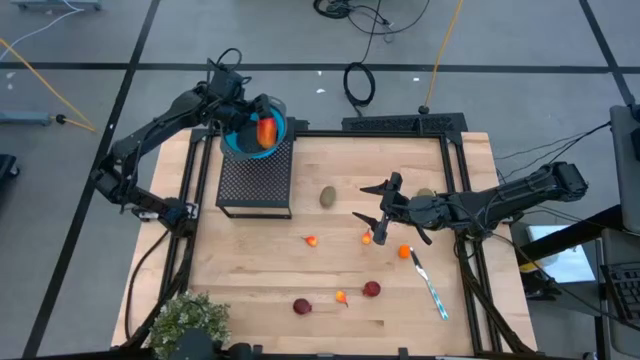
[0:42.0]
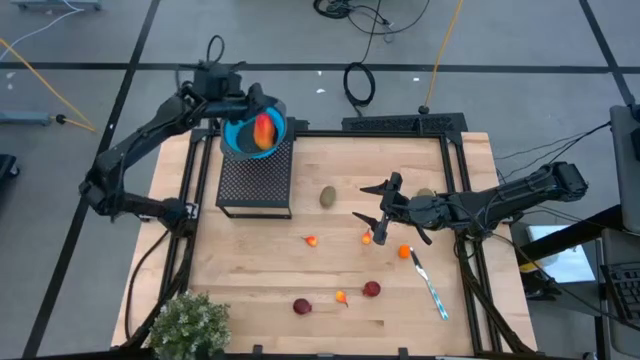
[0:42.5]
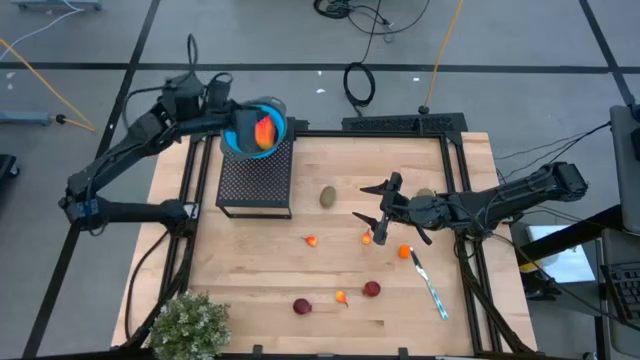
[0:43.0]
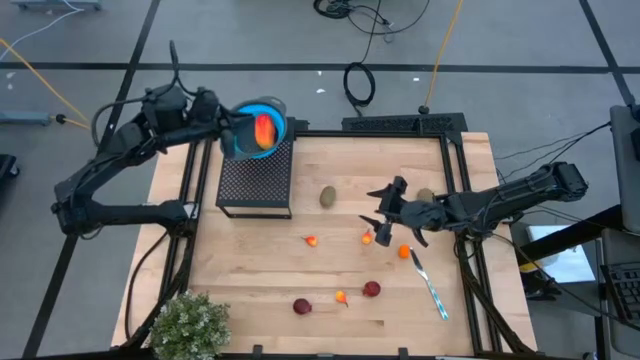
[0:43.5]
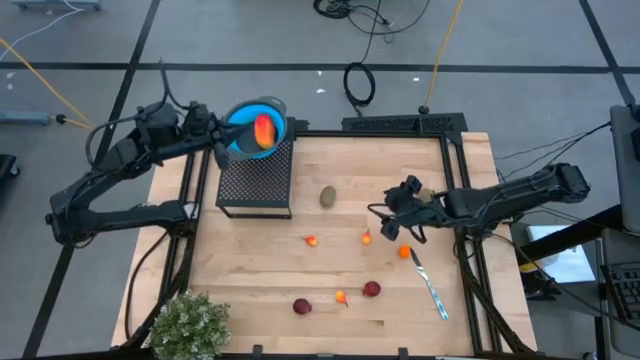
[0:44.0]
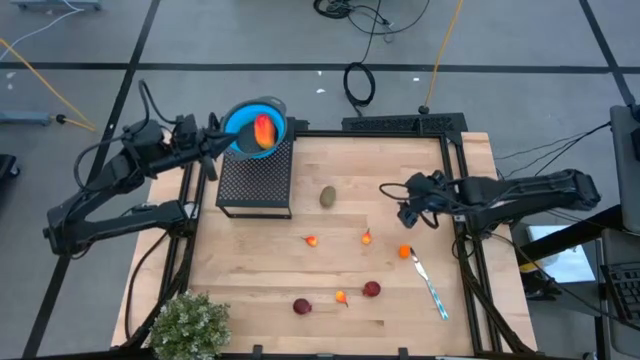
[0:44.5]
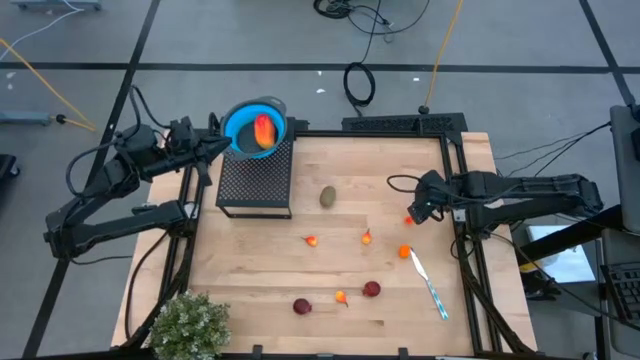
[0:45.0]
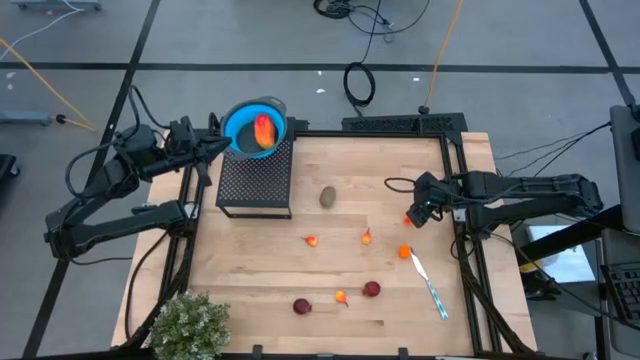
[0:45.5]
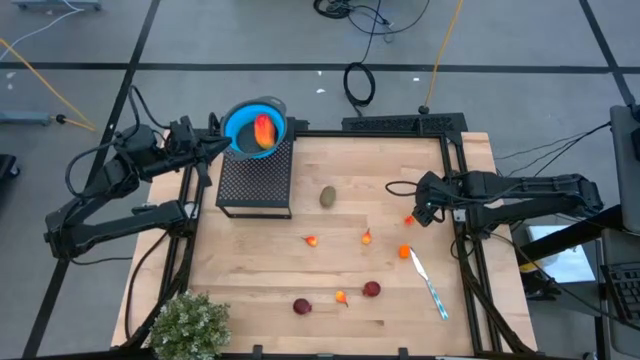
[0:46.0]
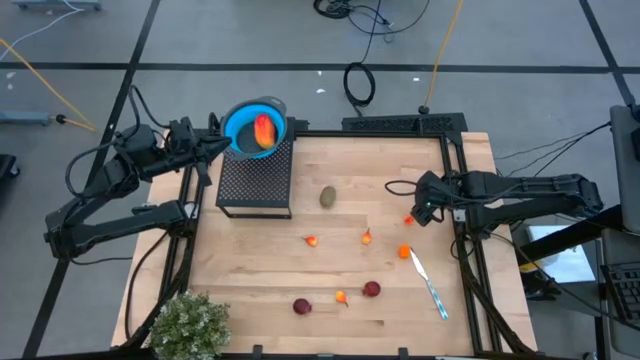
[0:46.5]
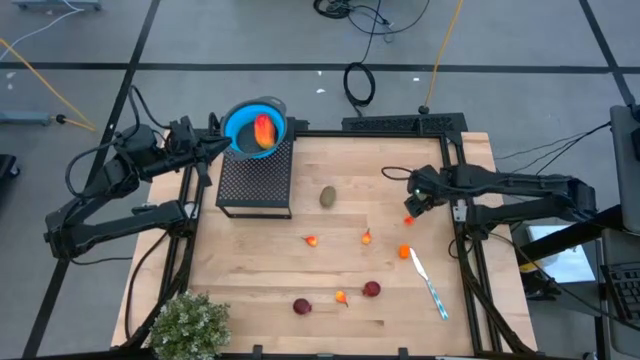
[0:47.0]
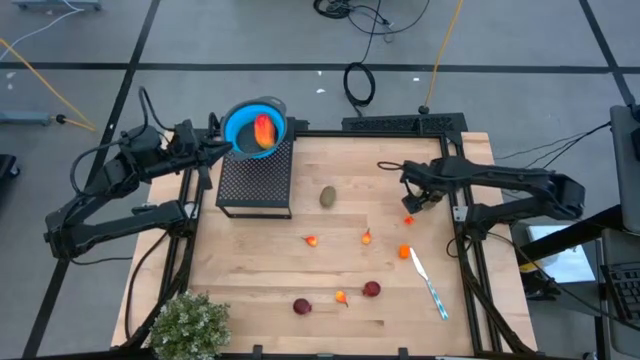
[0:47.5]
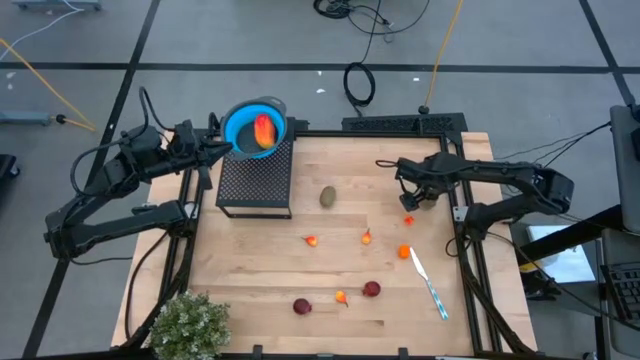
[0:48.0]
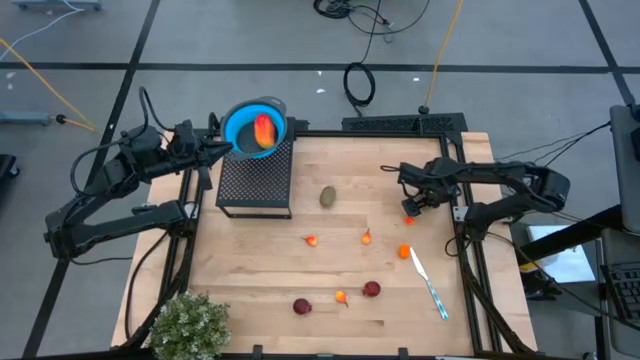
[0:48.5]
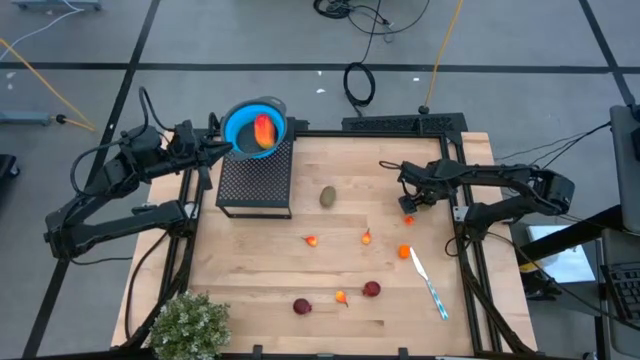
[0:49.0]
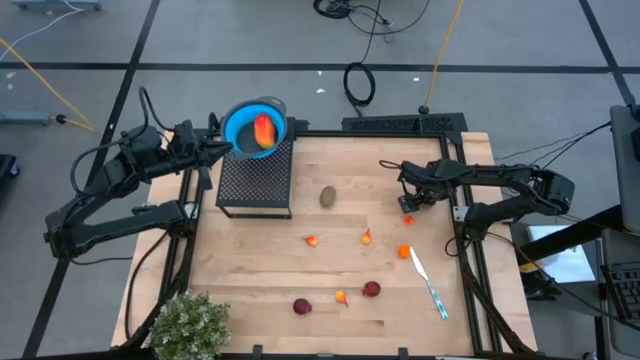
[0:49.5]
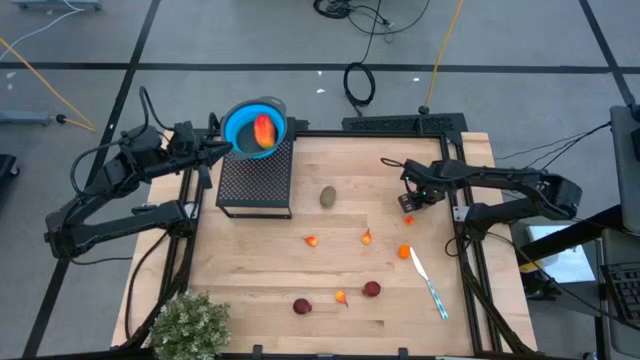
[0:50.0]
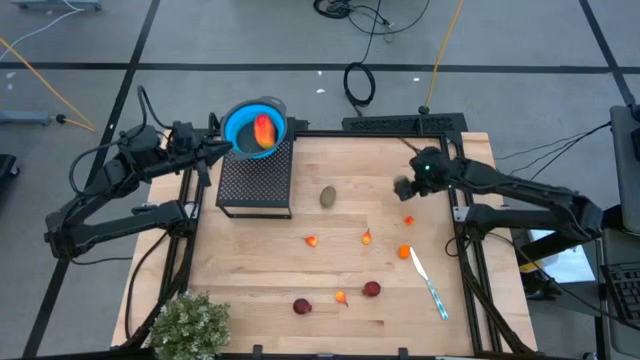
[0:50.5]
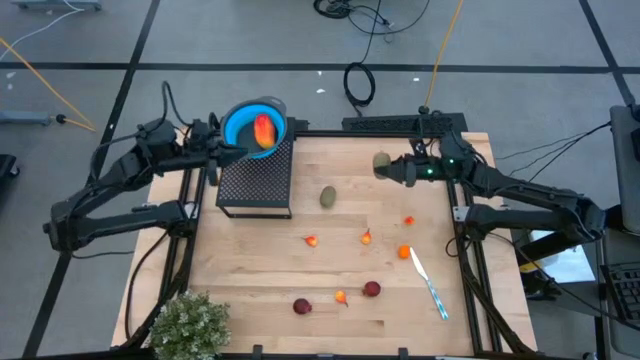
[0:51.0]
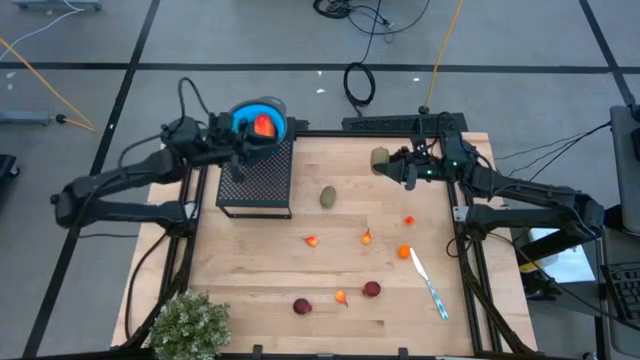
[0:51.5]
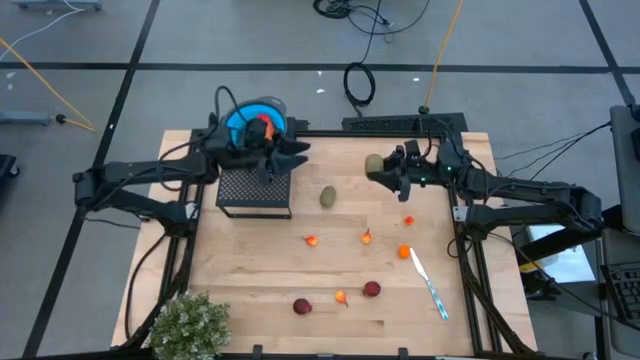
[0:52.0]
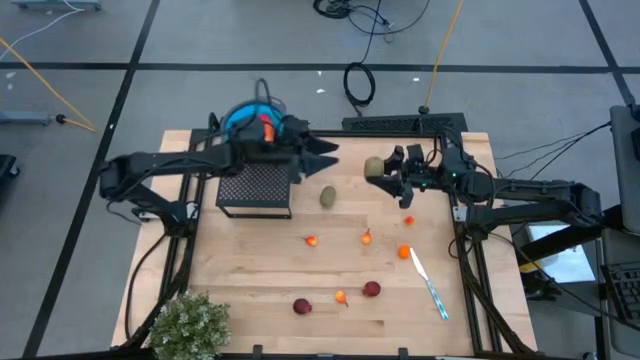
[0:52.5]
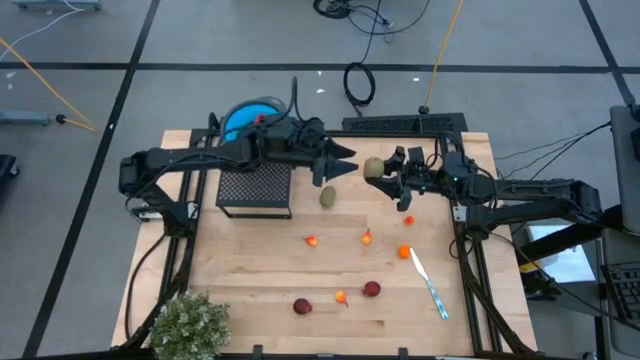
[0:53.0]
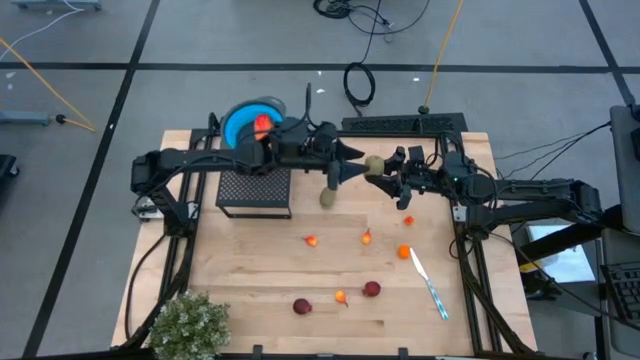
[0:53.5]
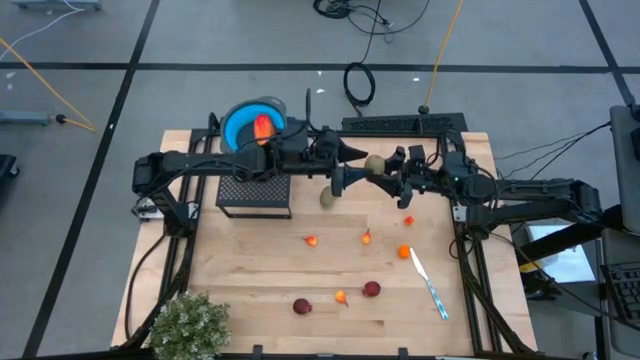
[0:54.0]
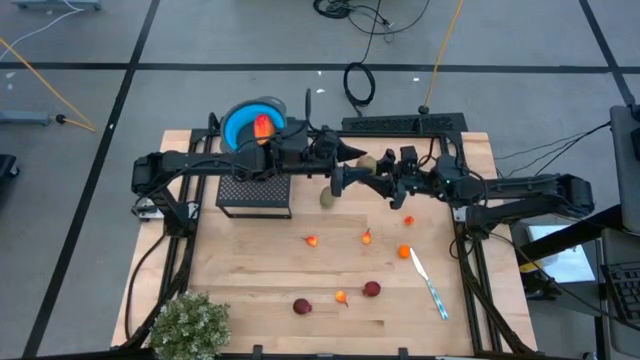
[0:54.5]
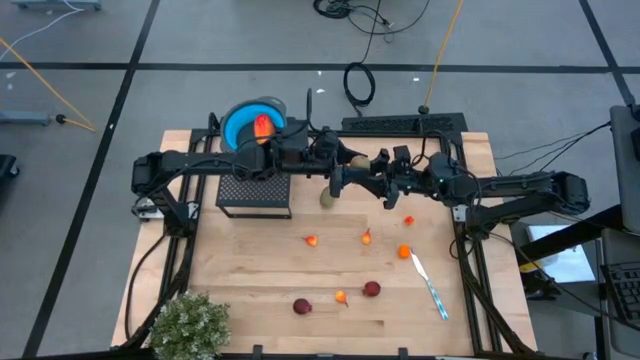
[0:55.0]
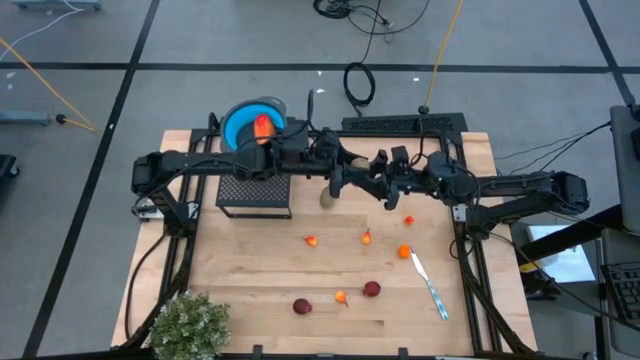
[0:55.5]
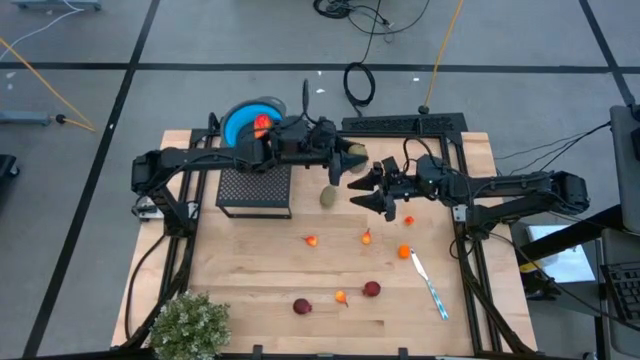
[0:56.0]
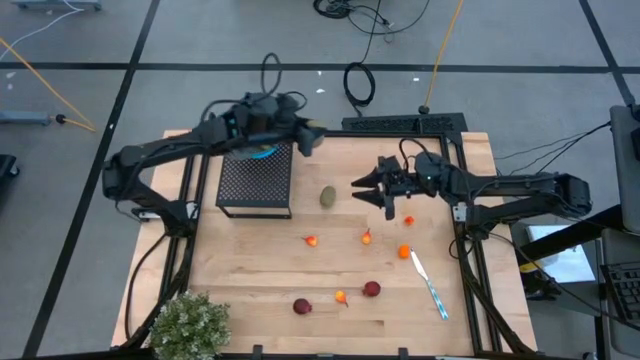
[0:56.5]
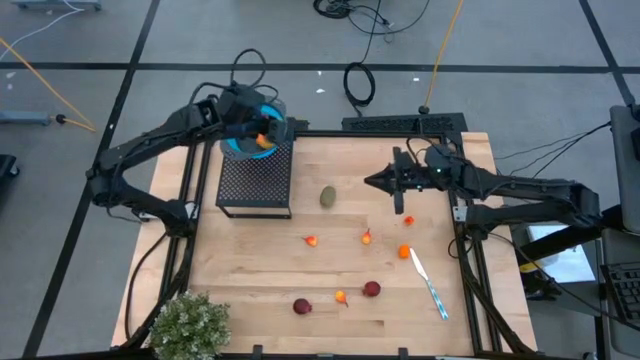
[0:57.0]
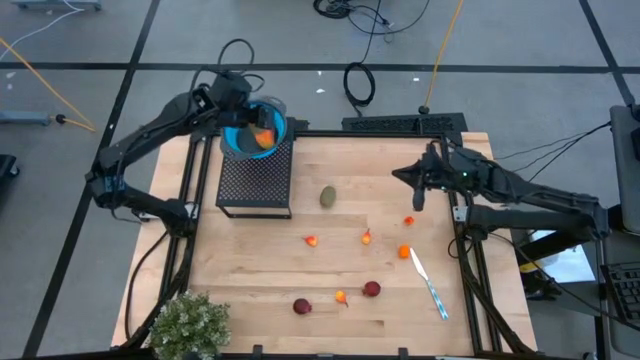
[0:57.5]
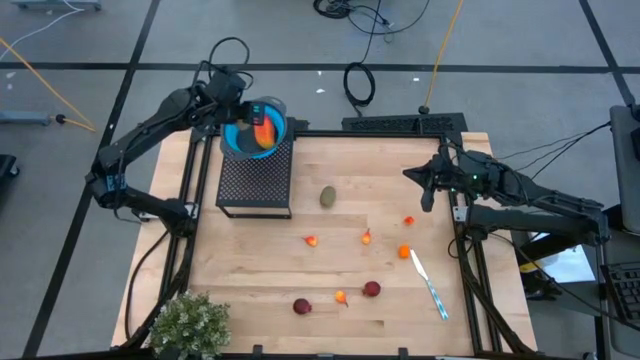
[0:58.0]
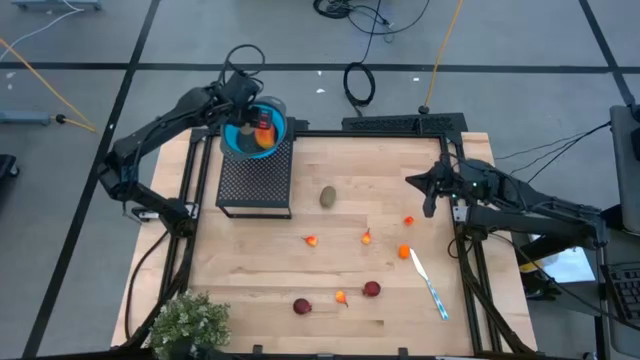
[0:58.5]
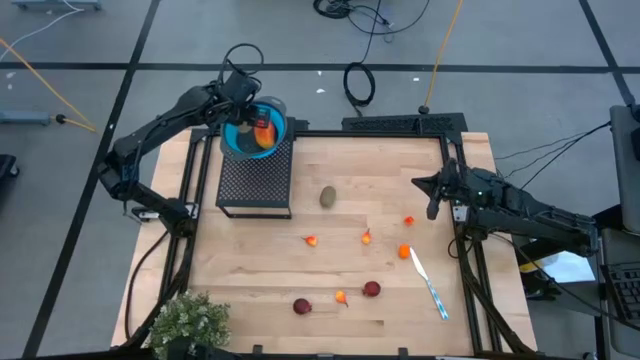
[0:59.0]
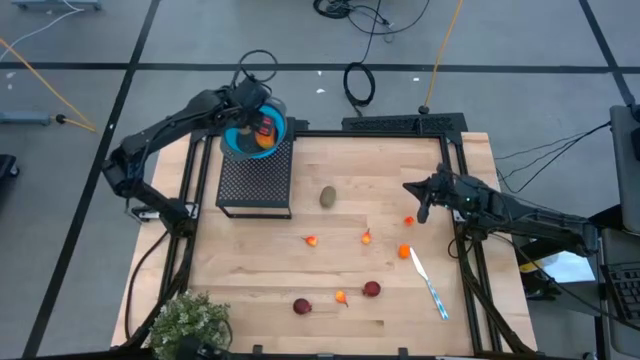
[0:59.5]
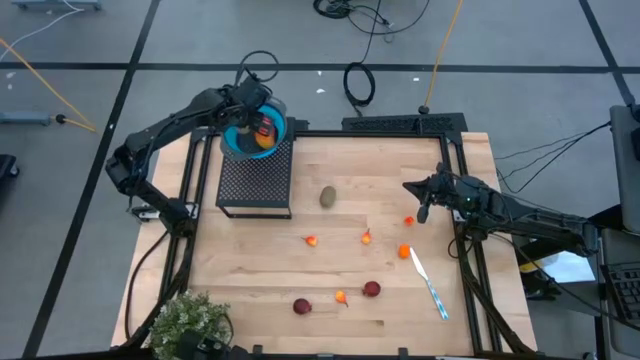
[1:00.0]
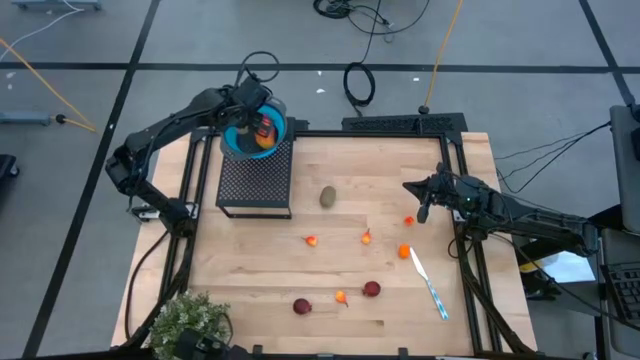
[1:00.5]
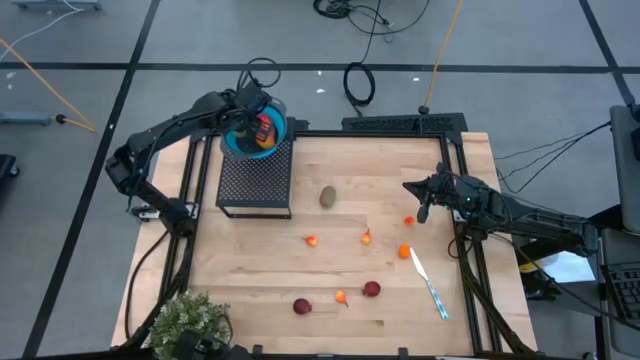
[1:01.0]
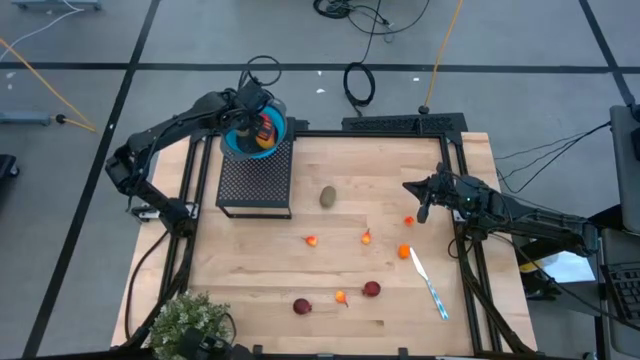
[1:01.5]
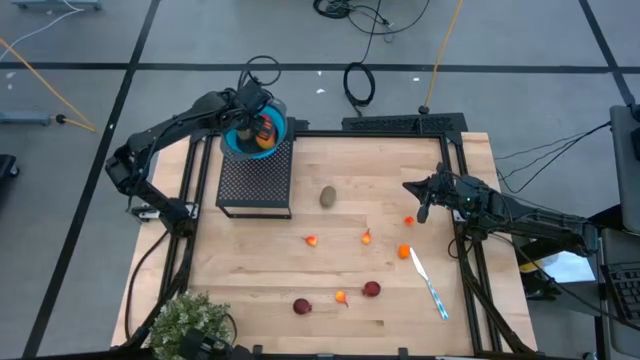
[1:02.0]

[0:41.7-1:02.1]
Task: Pick & Place Fruit
Put the right kiwi into the blue strainer bowl on the shelf
